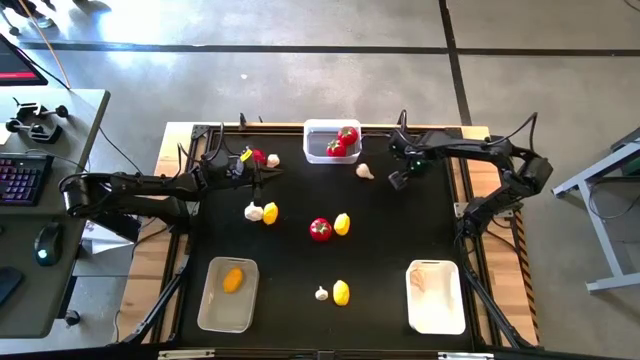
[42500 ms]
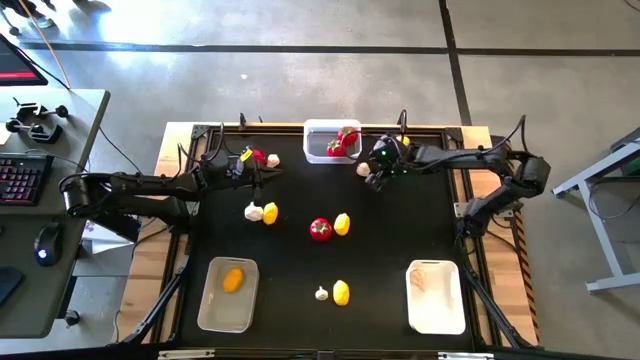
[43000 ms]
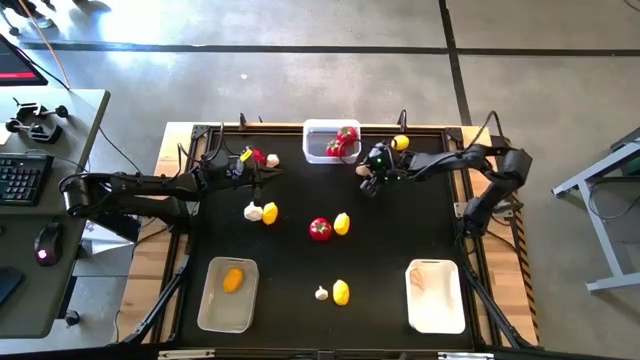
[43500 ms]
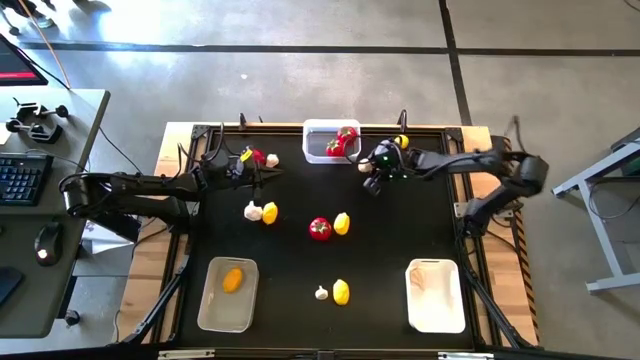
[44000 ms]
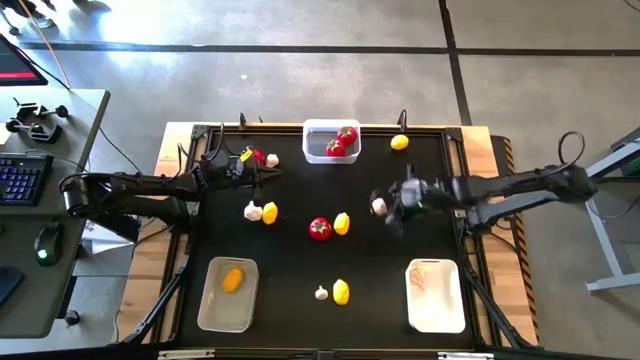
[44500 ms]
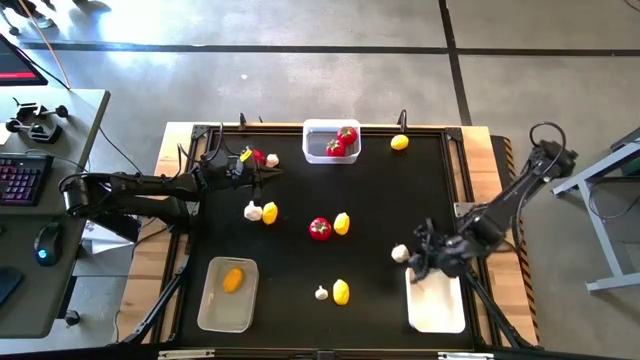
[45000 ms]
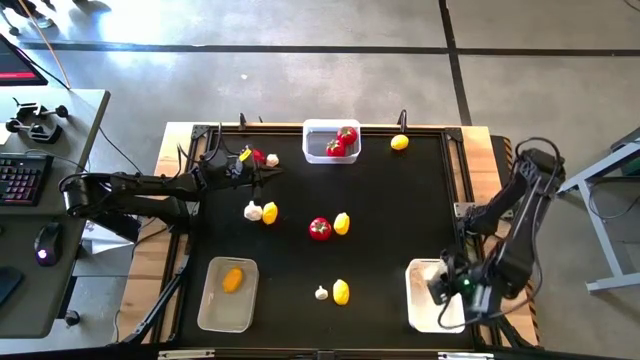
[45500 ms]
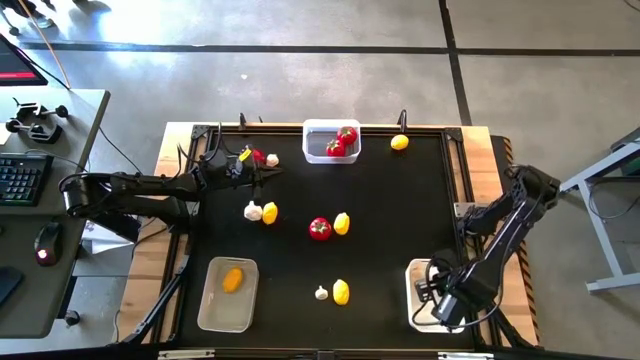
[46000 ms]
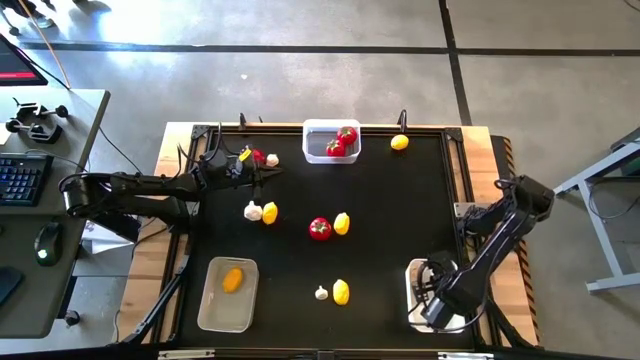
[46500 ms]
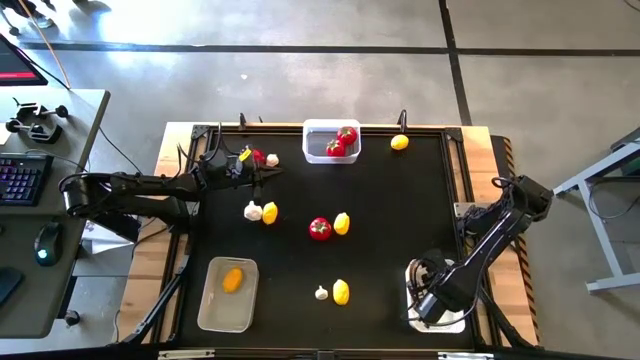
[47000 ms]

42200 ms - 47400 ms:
Task: Sort produce into baskets
Put the white garlic into the white bin

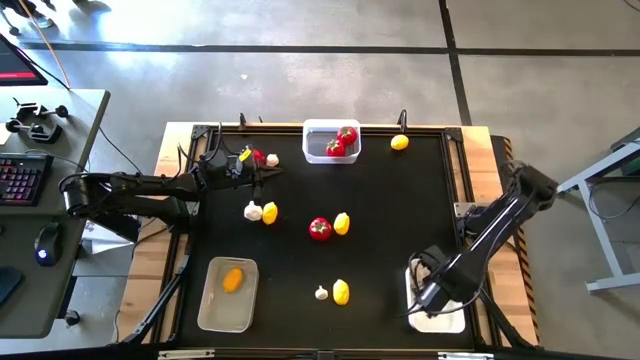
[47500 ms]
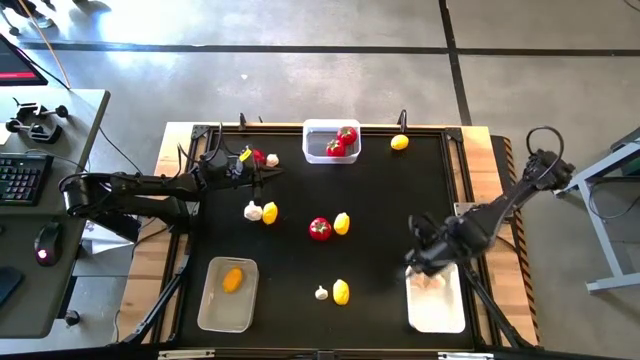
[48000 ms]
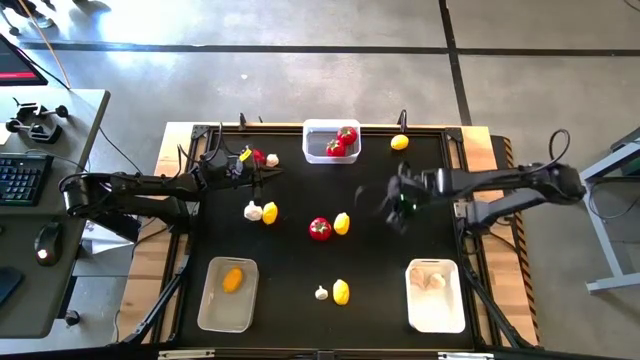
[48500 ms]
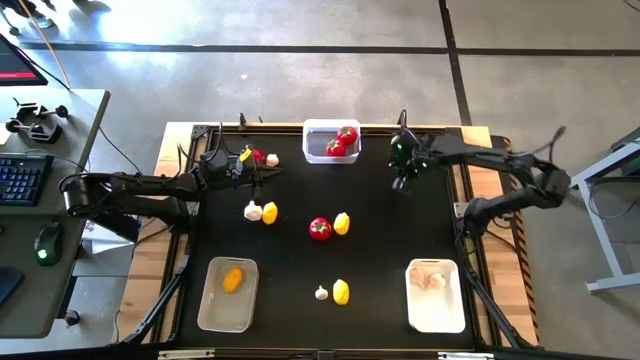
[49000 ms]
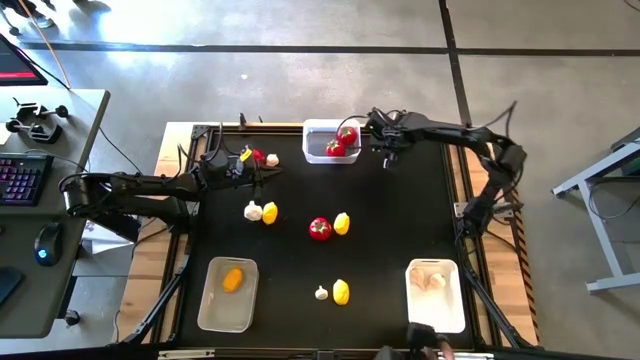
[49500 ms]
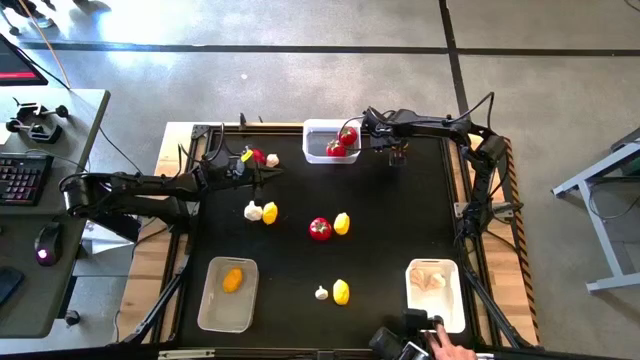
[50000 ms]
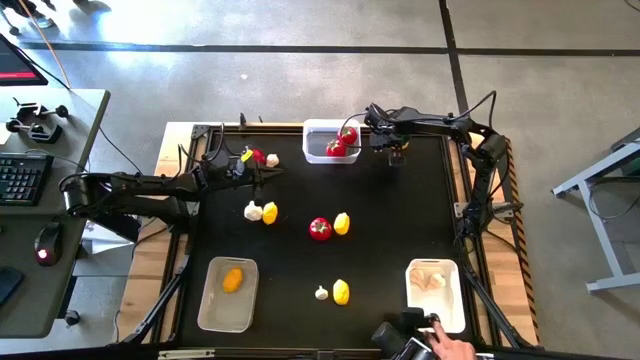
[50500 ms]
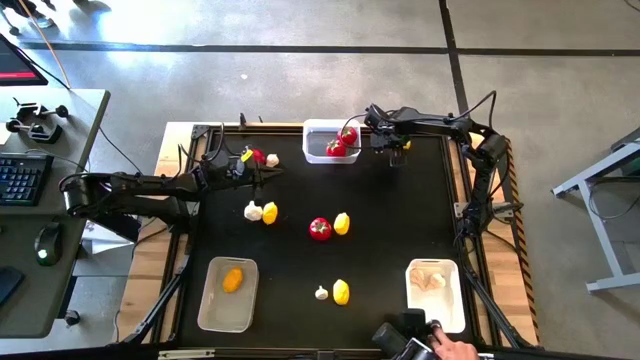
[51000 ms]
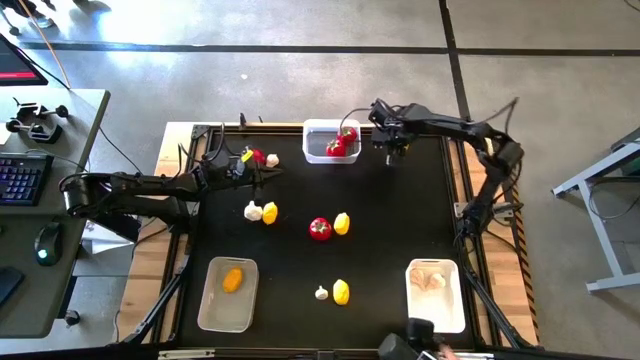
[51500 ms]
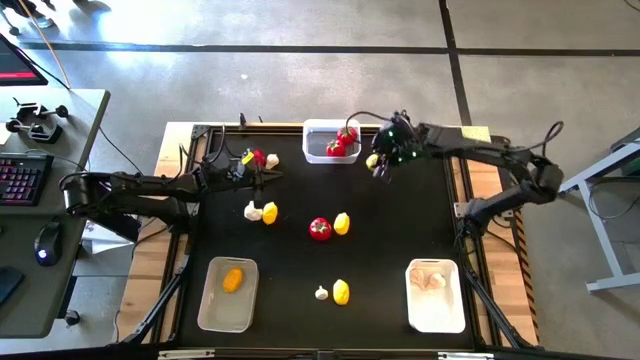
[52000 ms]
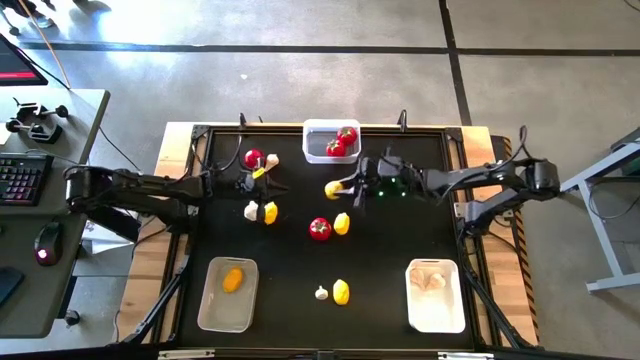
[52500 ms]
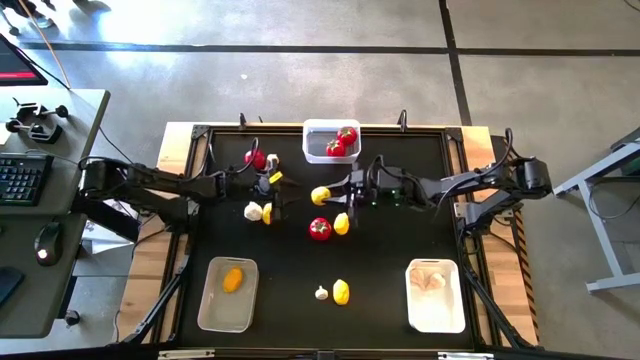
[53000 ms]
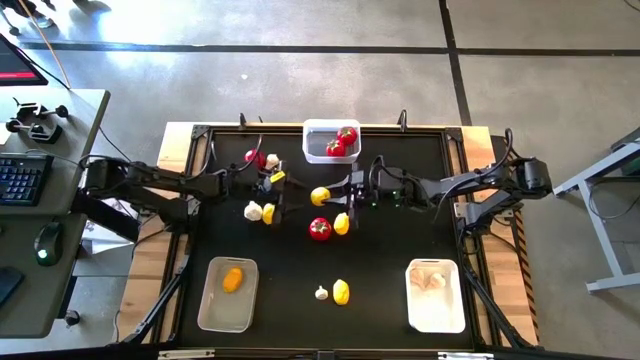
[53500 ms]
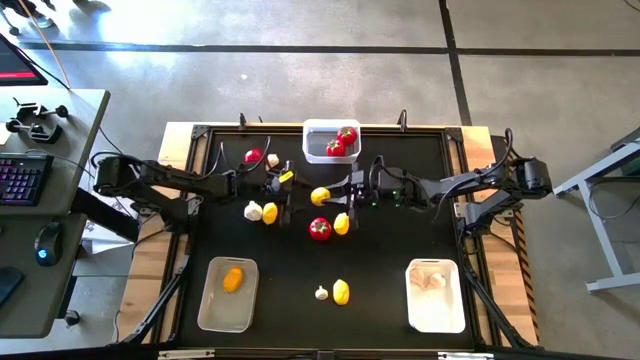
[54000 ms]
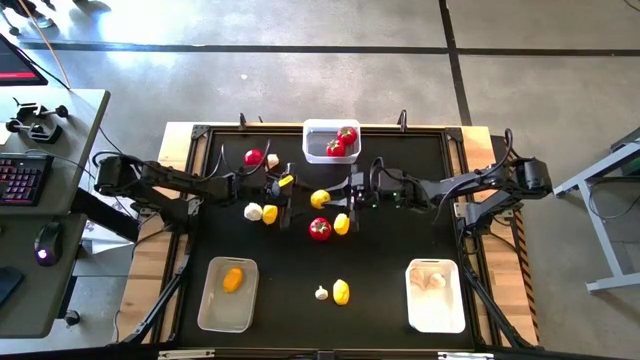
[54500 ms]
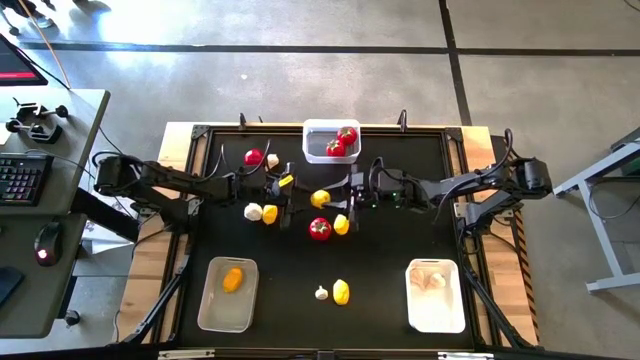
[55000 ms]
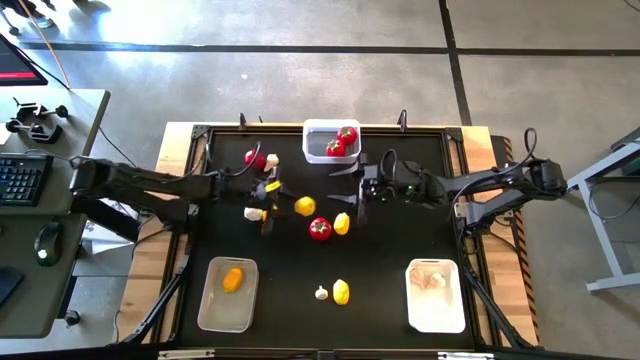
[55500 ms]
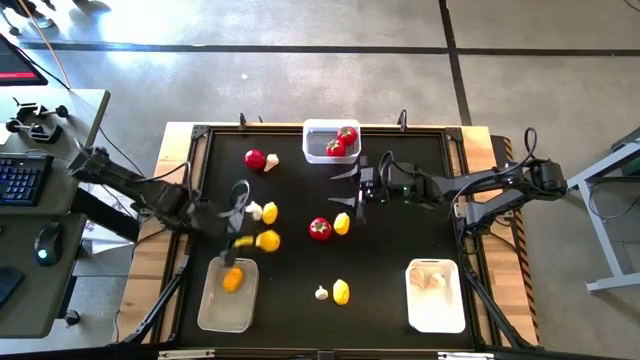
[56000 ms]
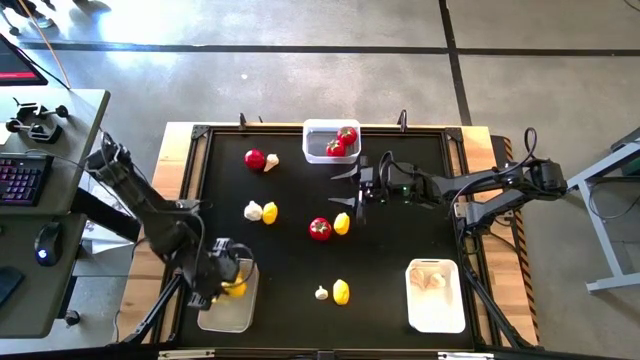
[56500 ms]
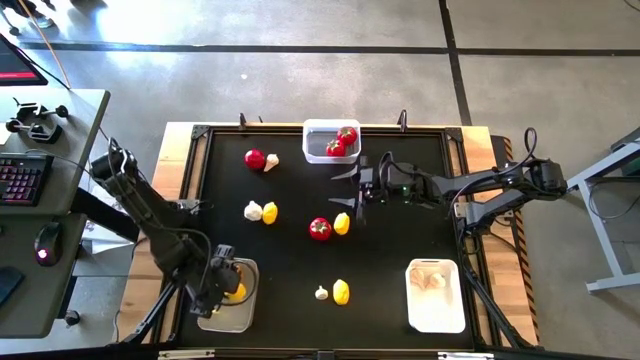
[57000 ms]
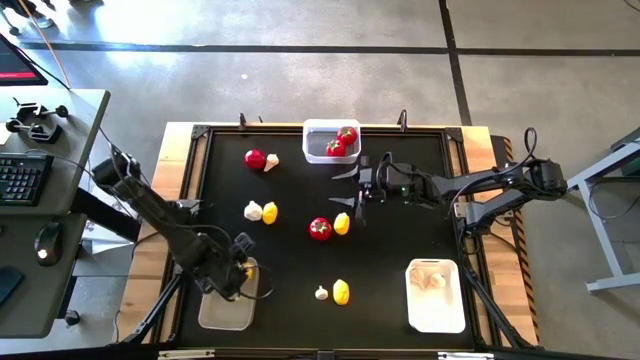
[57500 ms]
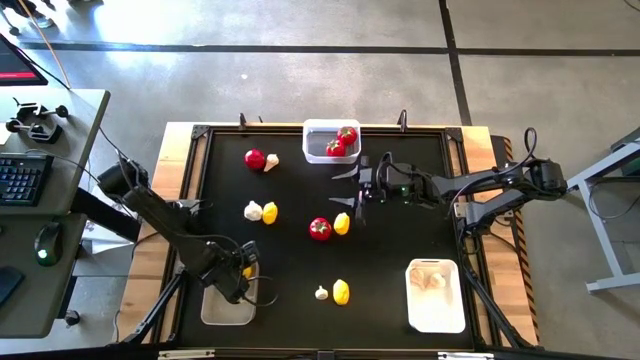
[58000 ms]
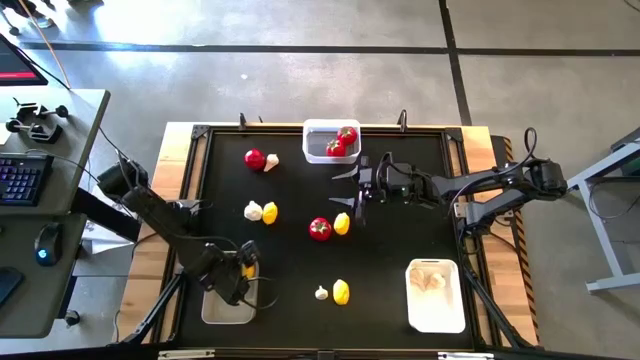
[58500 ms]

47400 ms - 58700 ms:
Put the yellow lemon into the gray bin

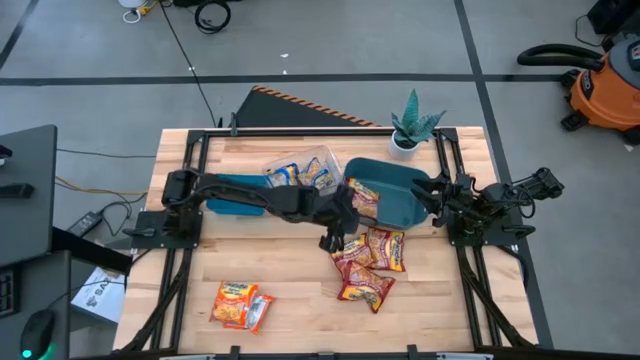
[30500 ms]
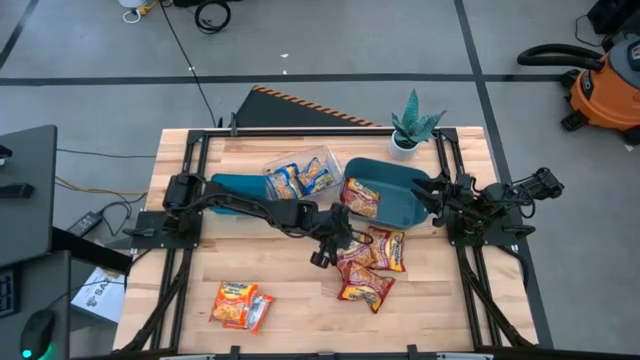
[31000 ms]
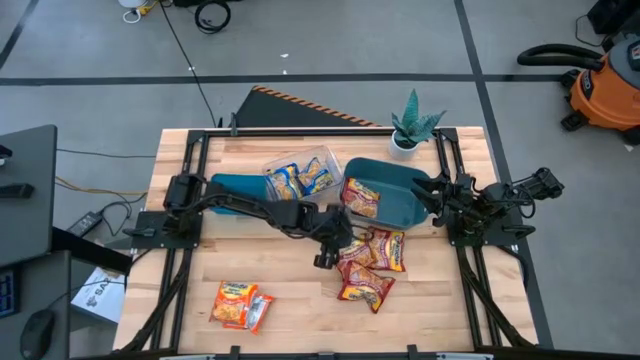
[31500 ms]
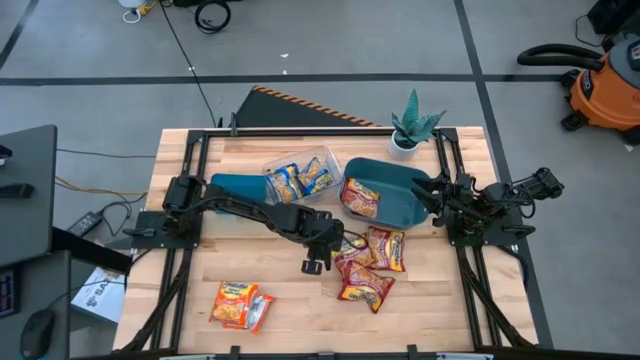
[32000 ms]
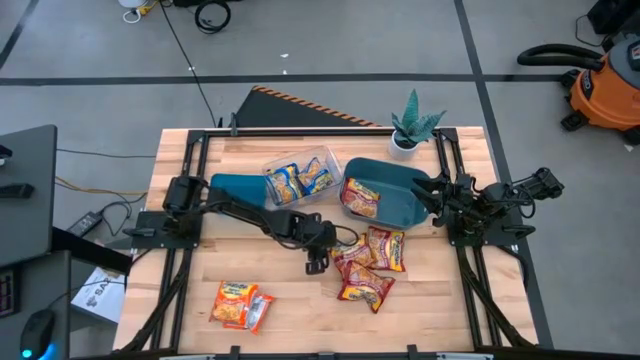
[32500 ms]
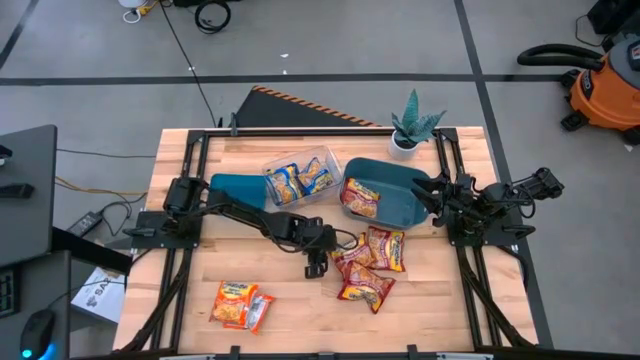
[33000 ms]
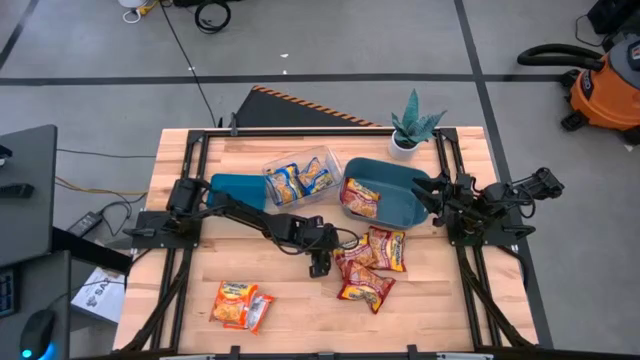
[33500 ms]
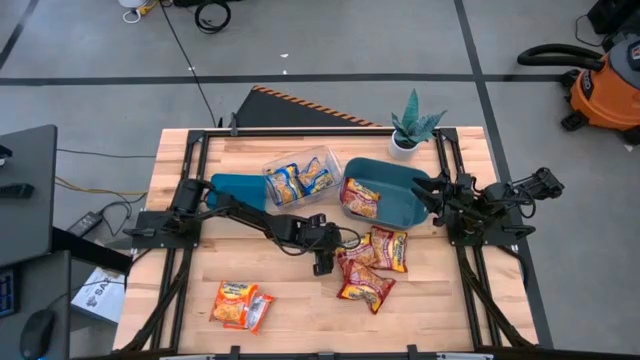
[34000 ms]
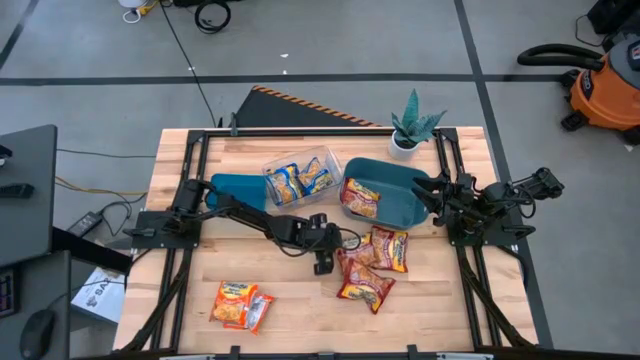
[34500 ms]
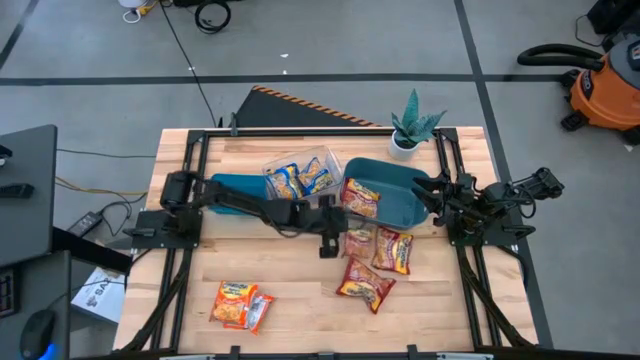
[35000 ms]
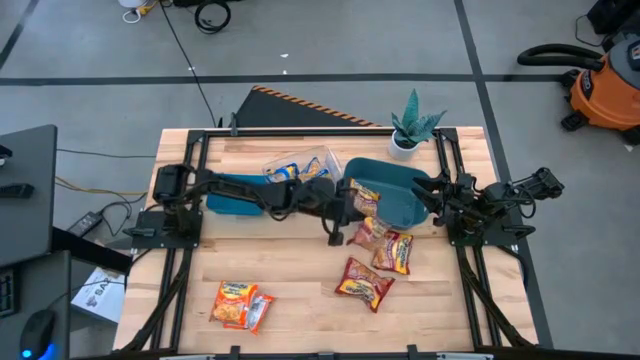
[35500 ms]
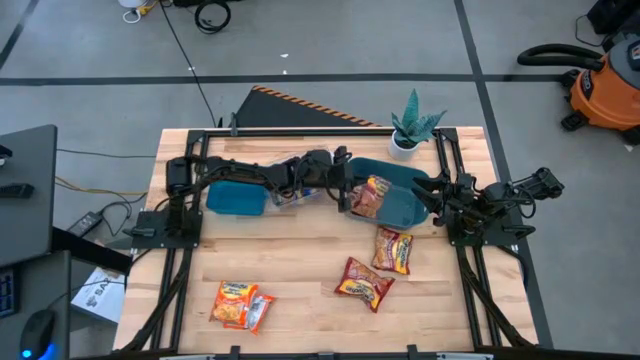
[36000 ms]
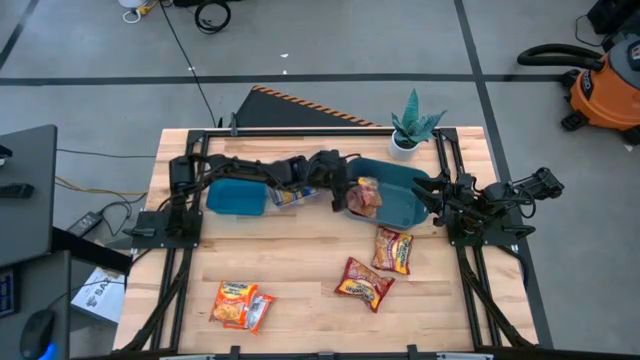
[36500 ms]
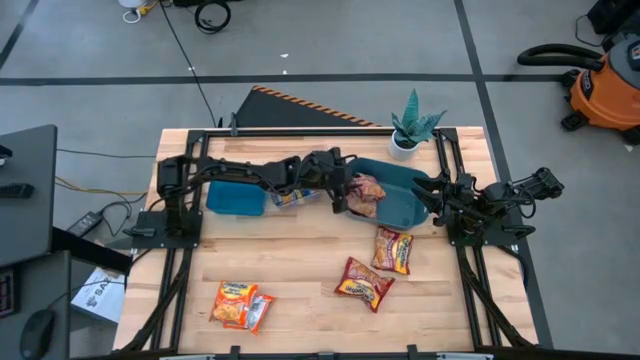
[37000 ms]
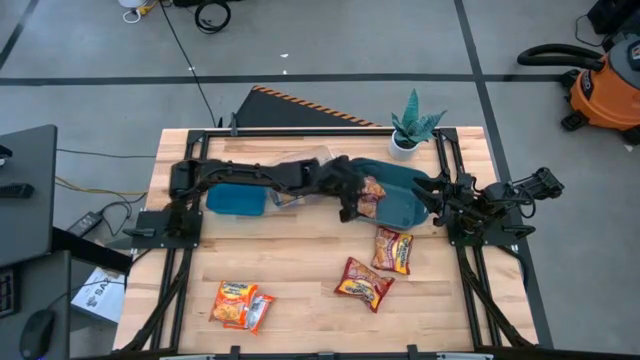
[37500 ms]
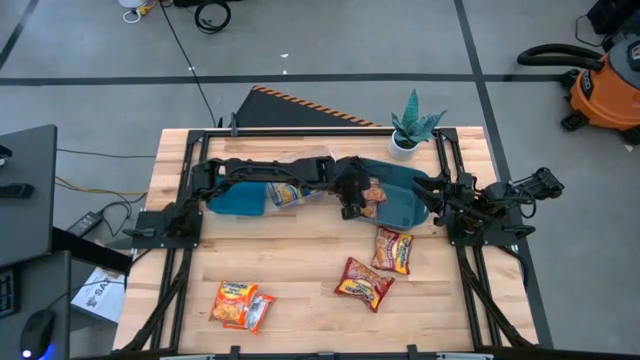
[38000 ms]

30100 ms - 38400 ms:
Task: Sort Maruchan noodles
Put the red noodle pack into the green bin
